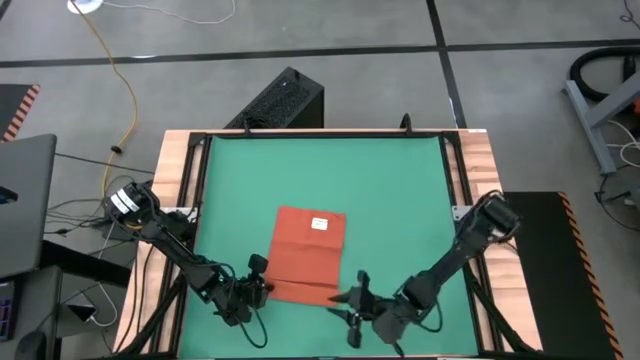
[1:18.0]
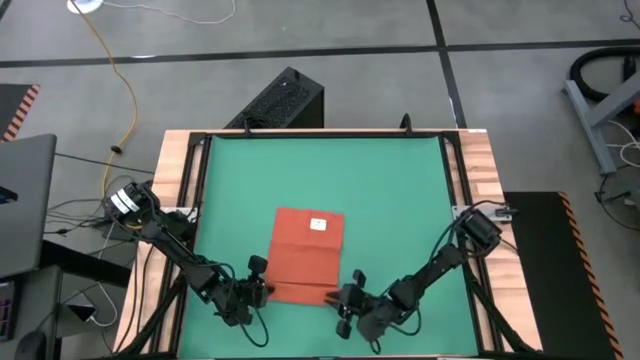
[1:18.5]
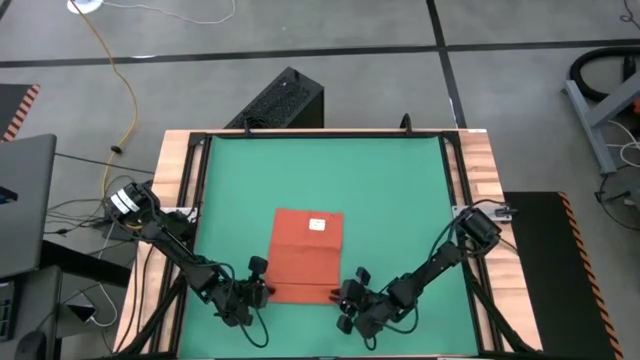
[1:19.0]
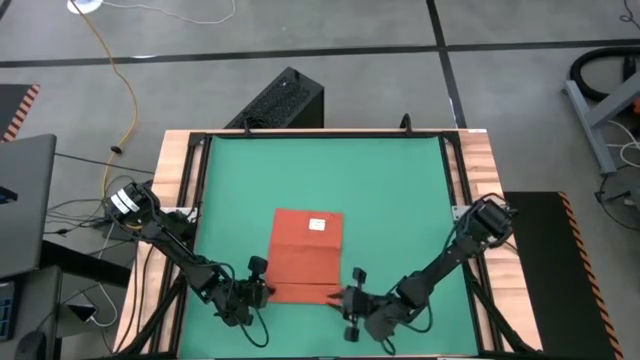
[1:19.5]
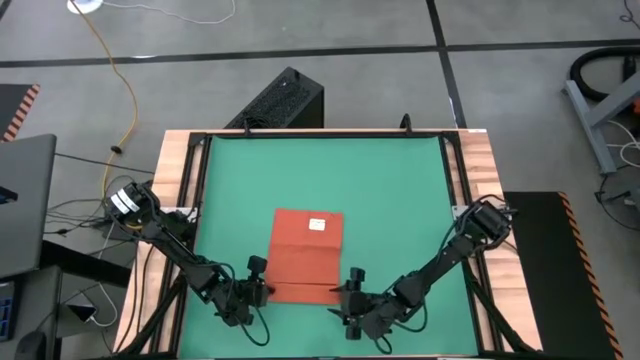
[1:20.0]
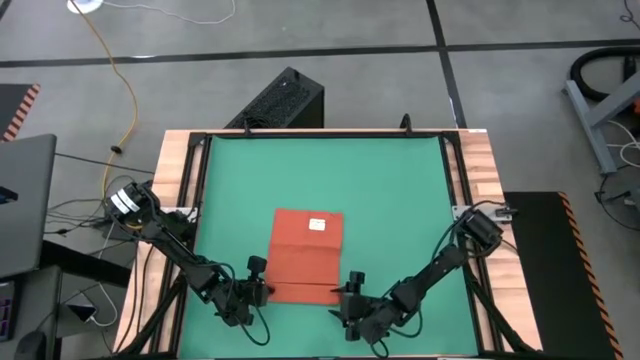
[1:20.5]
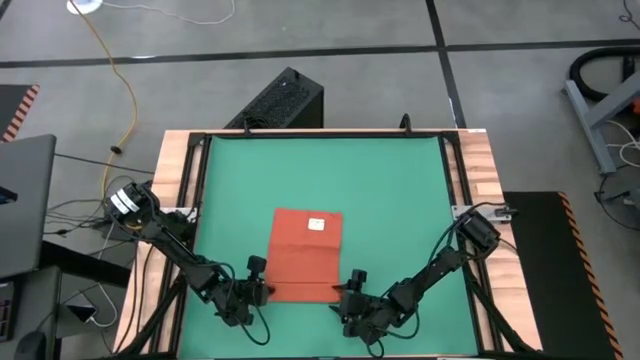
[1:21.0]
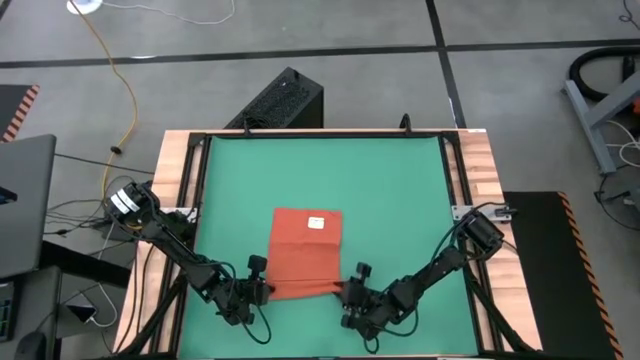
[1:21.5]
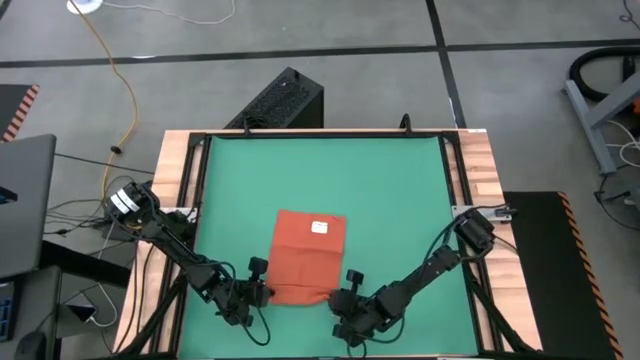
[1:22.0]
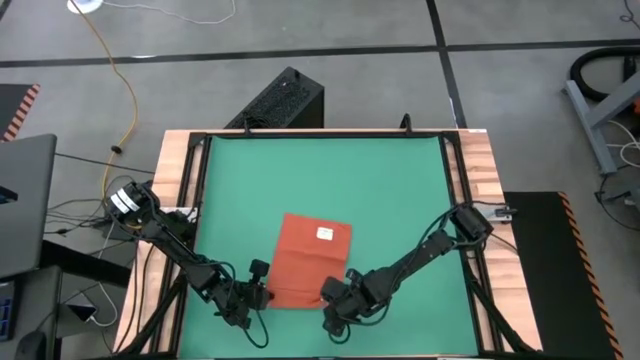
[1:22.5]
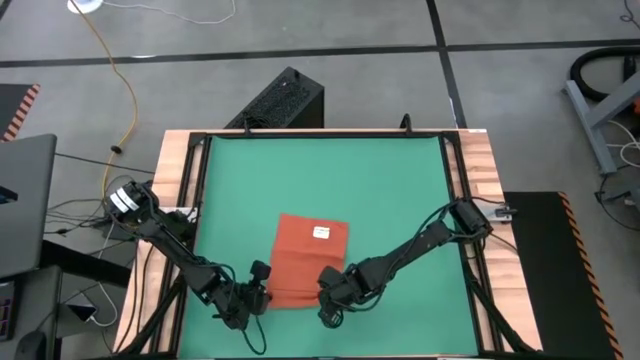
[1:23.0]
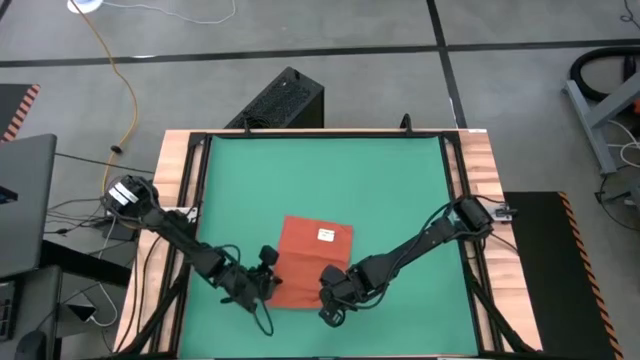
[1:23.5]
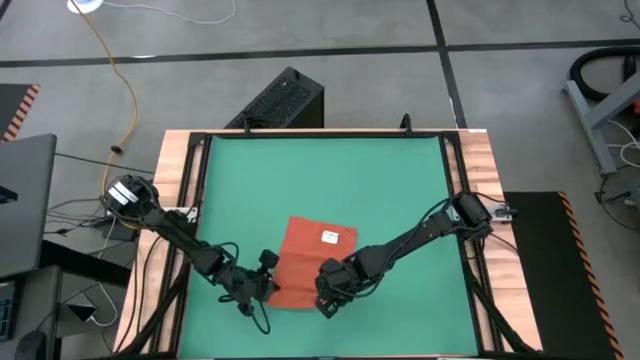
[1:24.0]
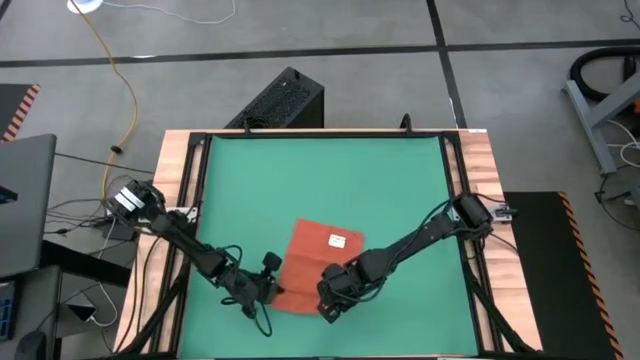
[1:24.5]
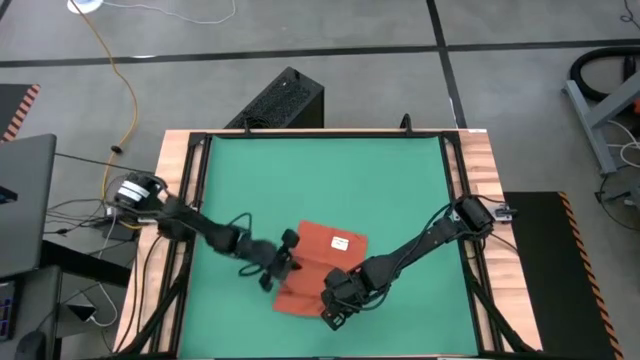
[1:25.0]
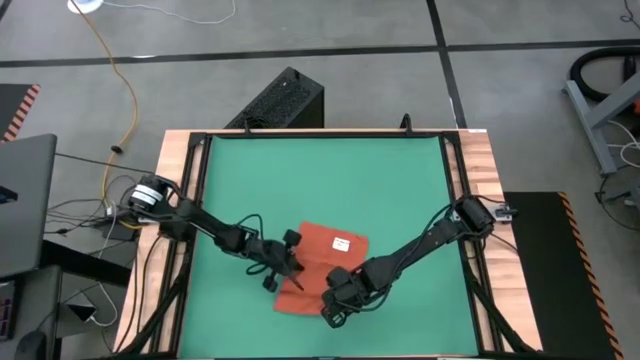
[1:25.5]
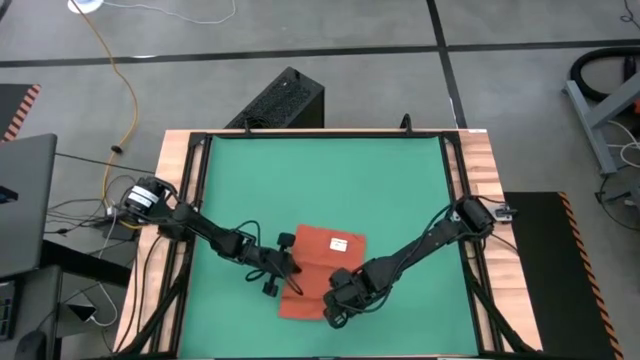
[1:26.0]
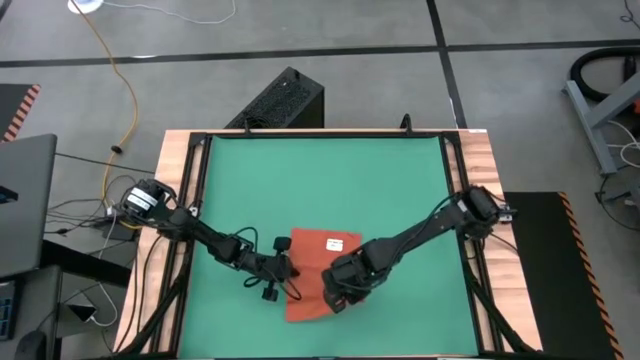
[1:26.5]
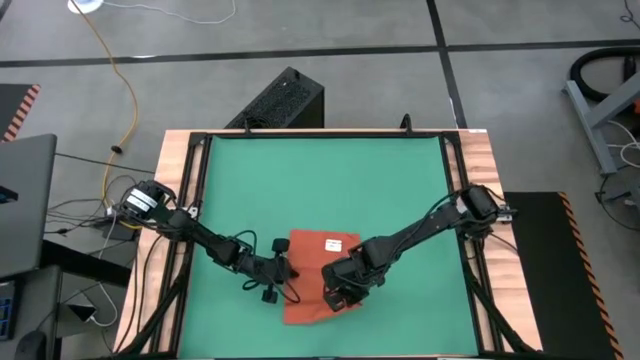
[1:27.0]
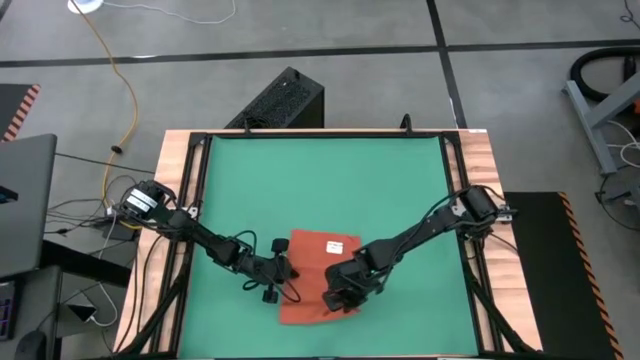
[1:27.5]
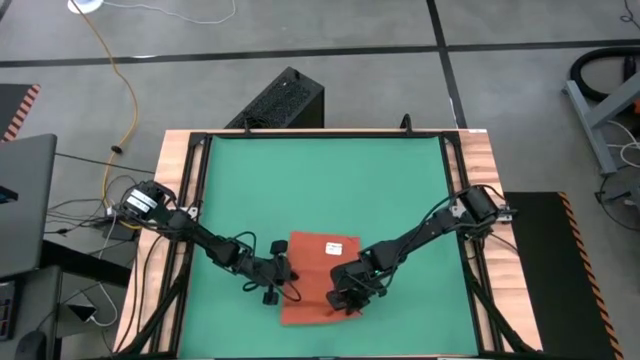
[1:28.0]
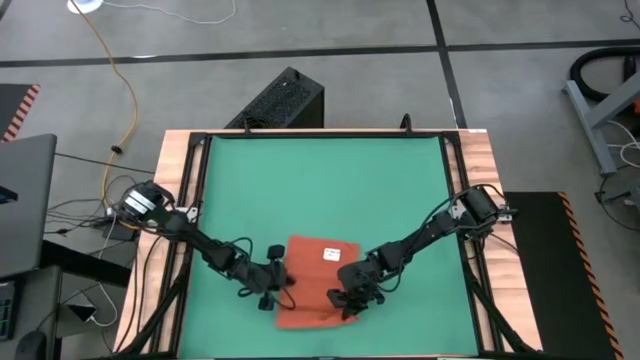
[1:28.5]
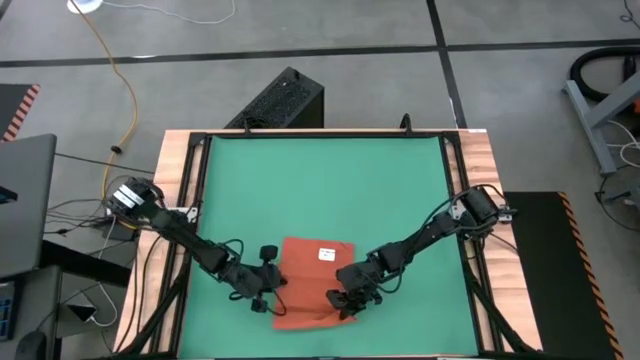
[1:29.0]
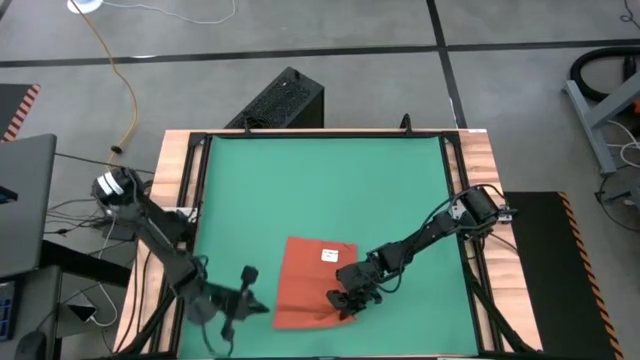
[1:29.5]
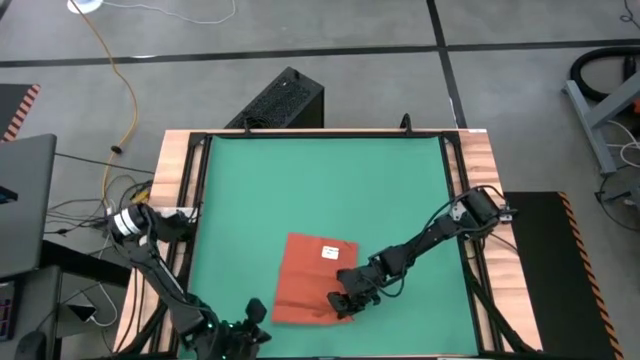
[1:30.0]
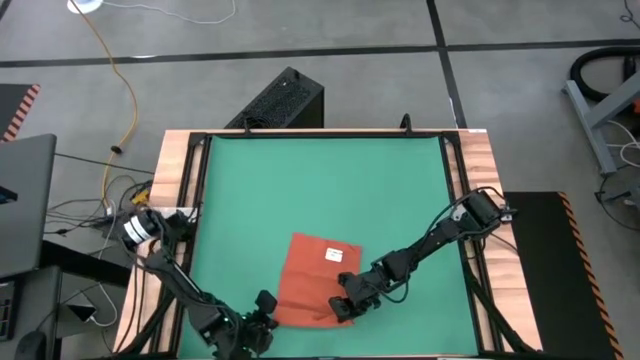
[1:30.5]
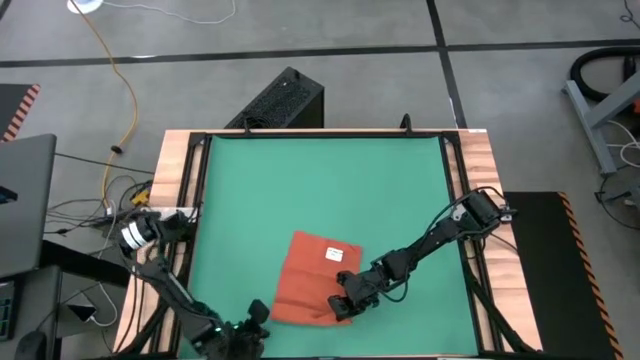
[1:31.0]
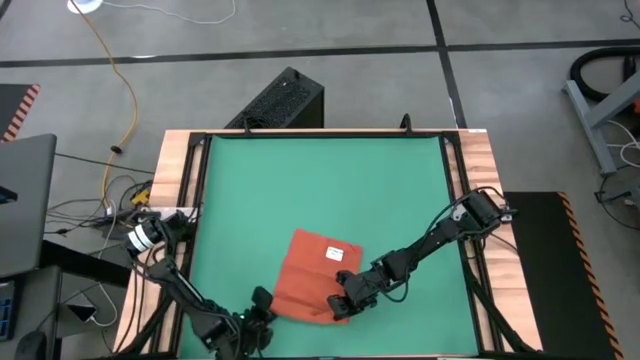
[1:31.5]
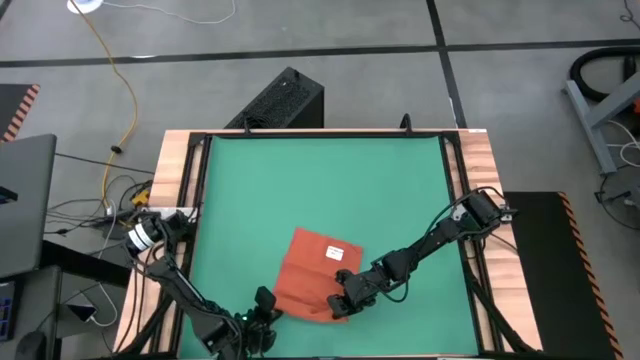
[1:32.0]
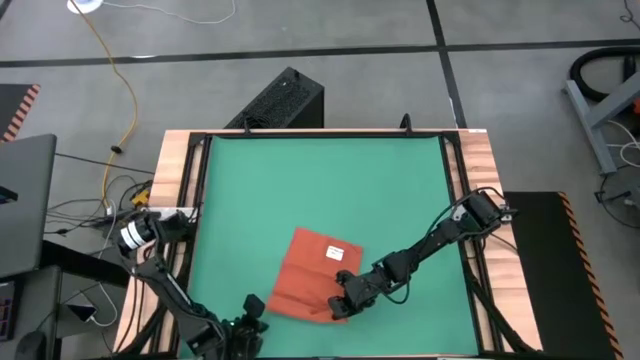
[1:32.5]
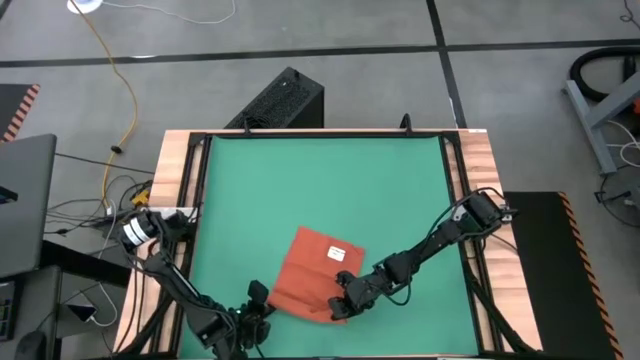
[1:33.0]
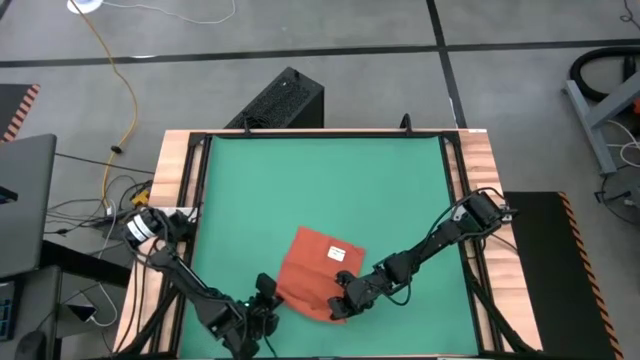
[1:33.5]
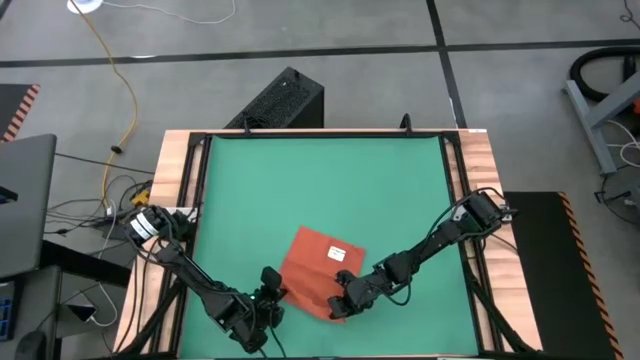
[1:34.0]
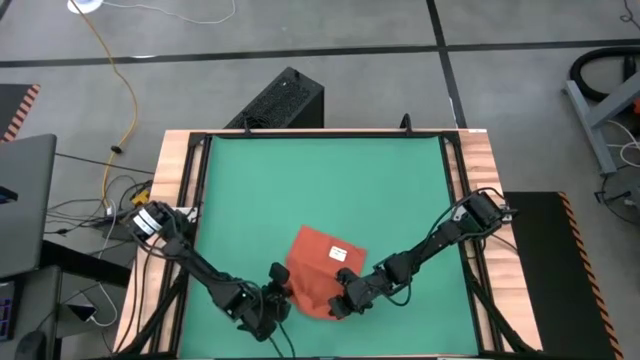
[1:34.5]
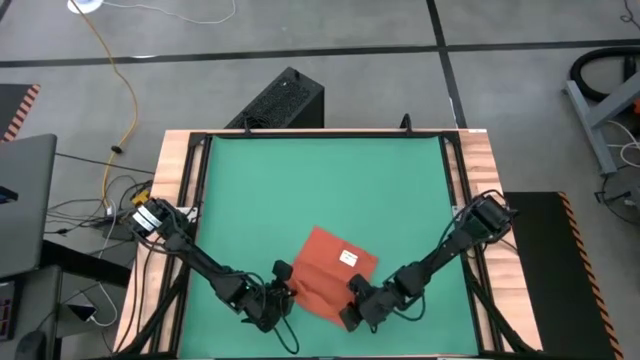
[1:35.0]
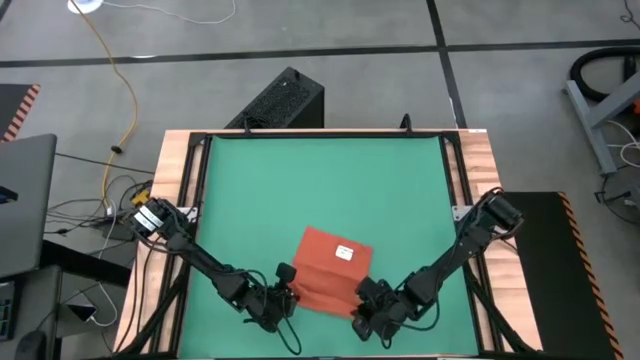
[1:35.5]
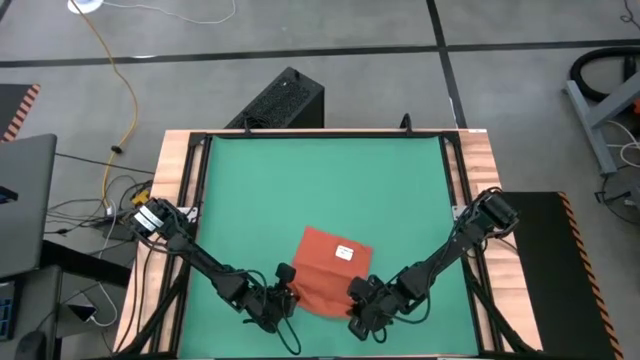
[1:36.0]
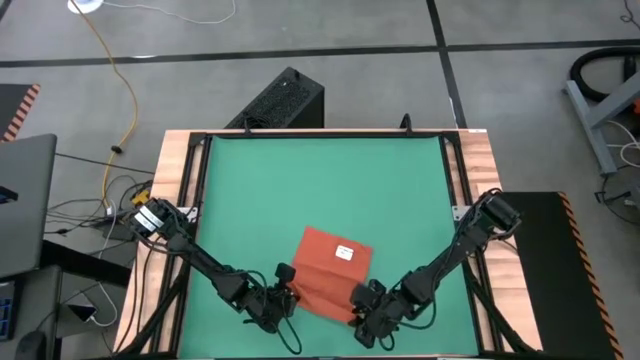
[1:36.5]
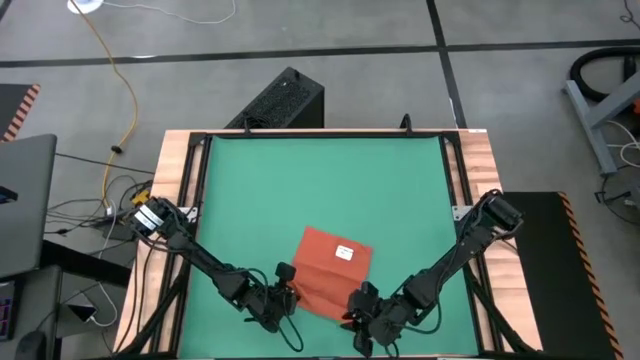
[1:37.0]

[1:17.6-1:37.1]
Task: Roll towel
Roll the orange towel

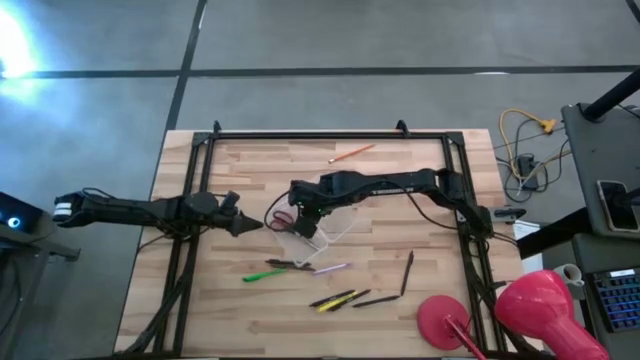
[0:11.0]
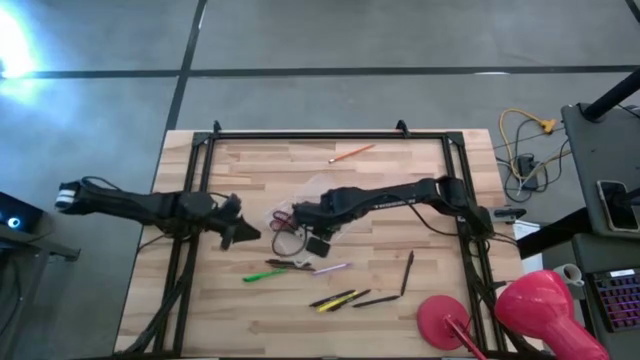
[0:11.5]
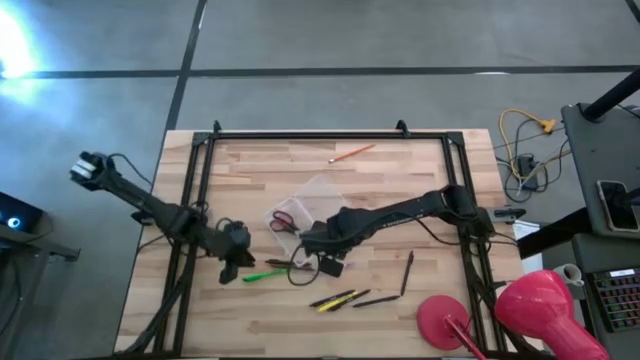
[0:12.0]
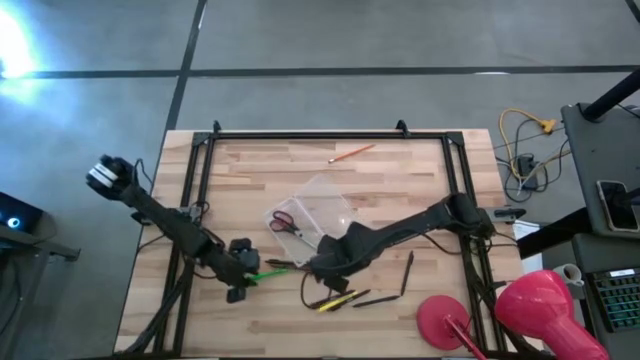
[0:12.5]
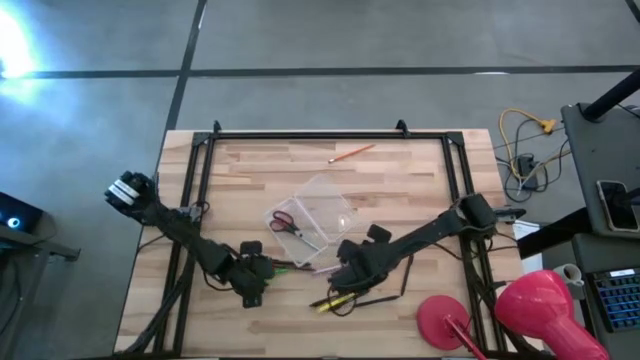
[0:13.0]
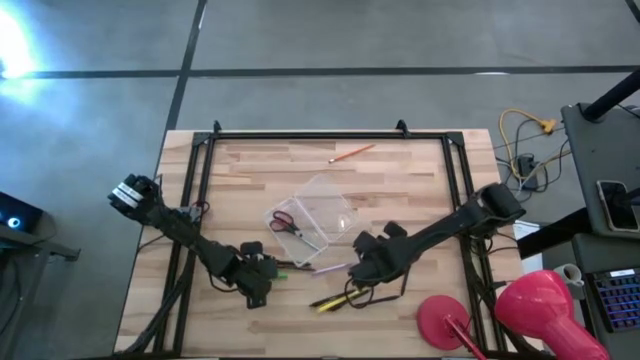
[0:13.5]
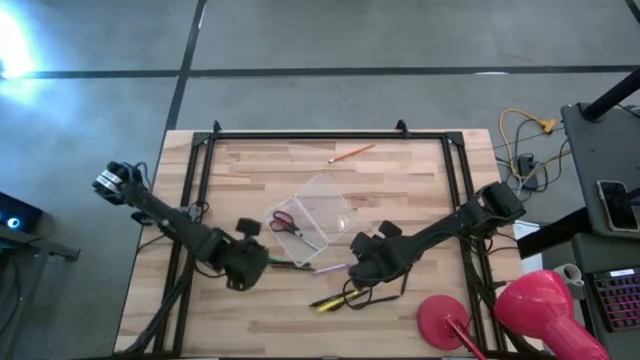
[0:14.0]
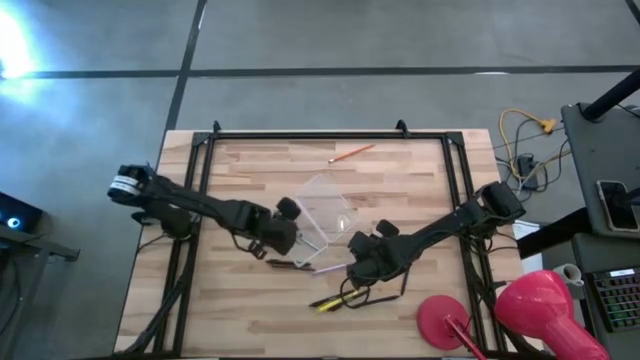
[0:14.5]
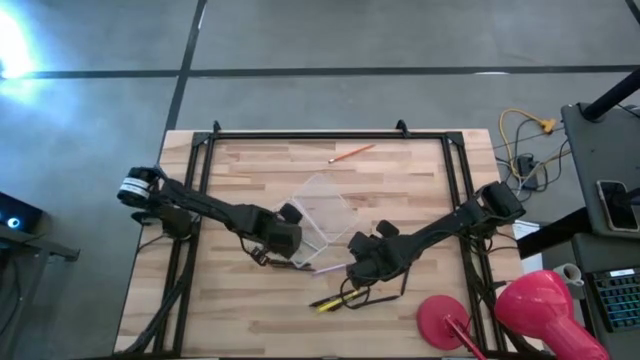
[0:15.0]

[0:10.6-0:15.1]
Task: Pick & place school supplies into a supply box
Put the green pen into the transparent case
